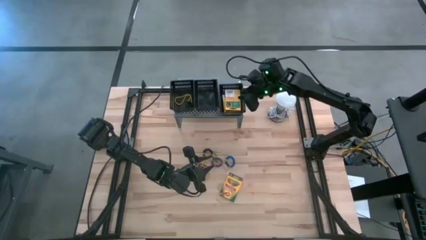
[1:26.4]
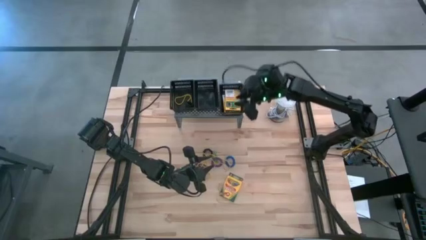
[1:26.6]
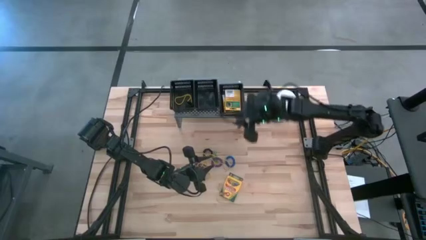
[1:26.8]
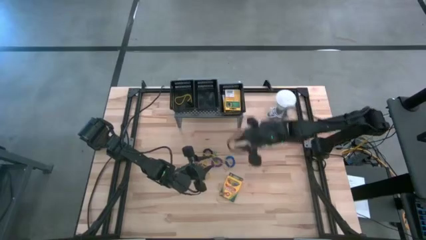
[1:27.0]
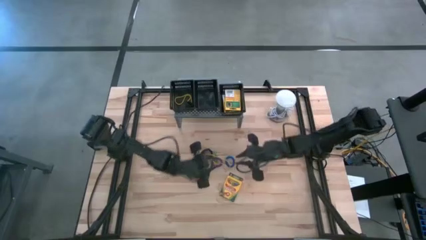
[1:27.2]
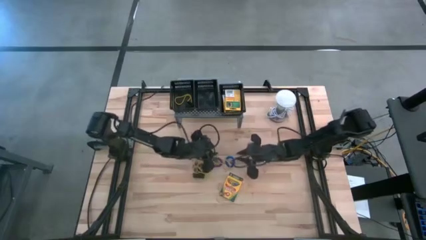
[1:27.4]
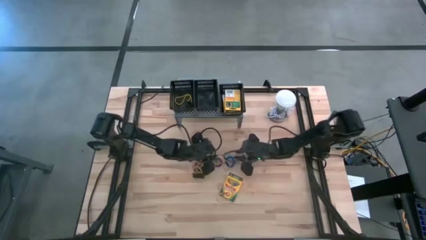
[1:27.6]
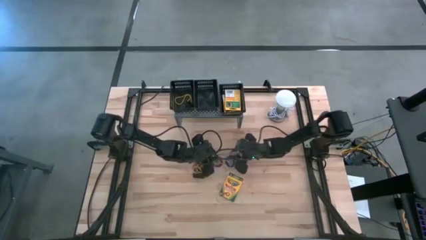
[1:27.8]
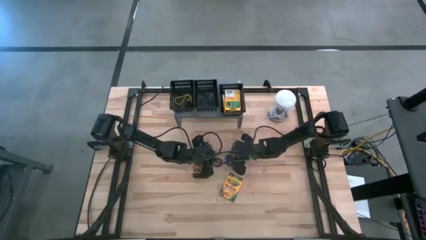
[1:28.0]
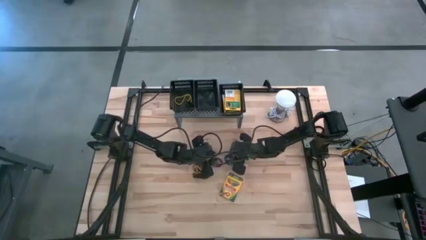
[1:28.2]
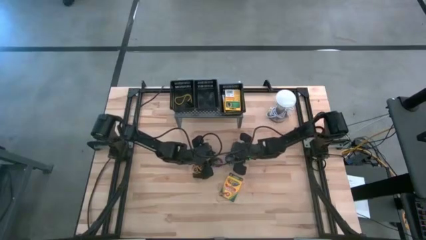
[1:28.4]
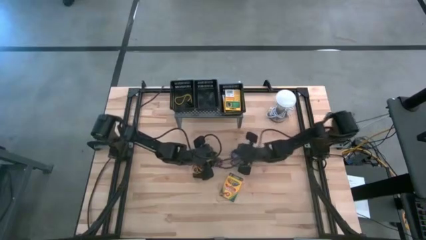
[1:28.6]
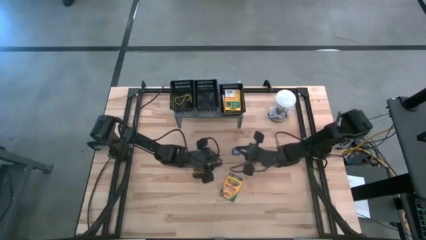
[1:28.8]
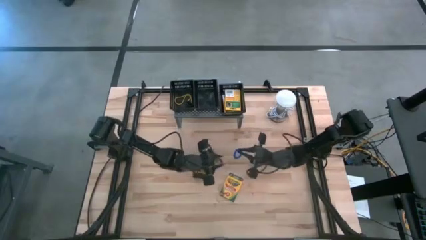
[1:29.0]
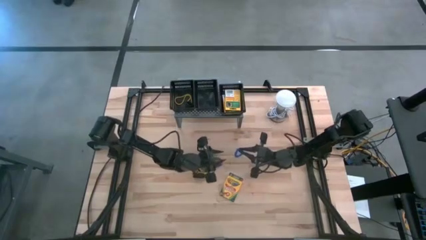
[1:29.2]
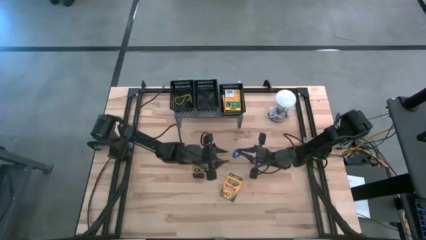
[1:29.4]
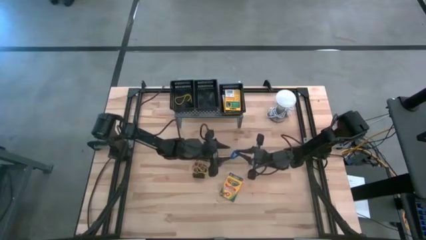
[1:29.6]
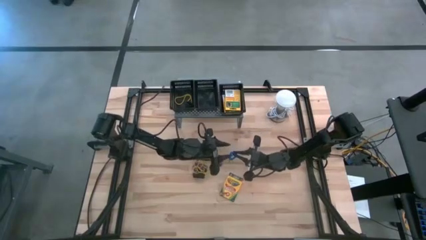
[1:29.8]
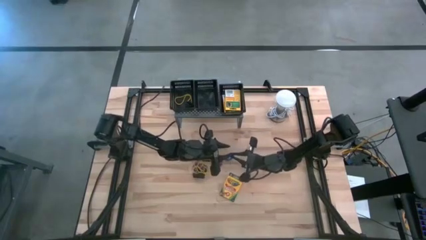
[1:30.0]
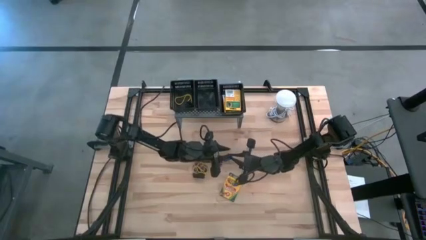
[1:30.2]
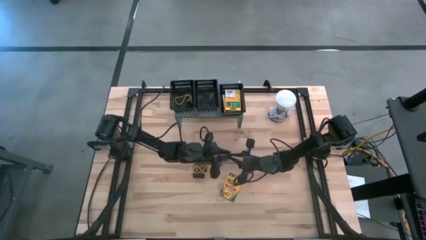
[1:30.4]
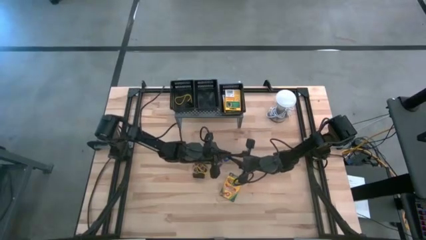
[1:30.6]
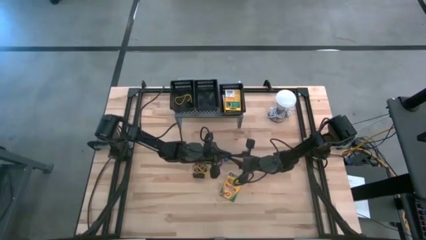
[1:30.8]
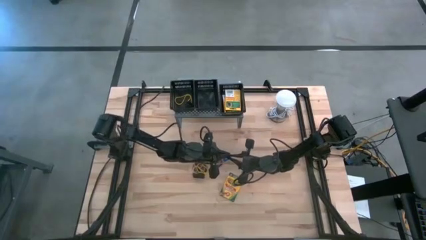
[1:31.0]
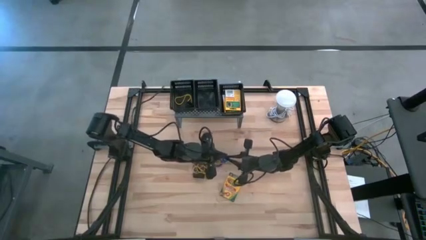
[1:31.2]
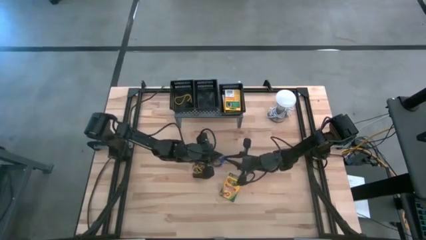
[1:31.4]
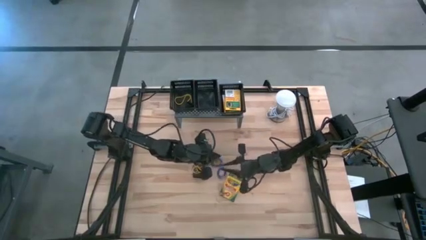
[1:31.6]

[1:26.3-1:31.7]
Task: Pick & Place Office Desk Supplies
Put the blue spring keychain into the middle black bin on the shelf

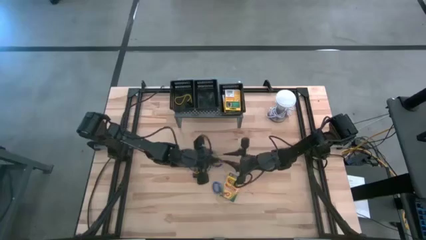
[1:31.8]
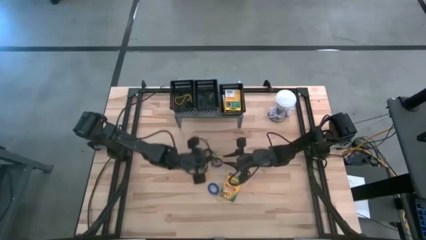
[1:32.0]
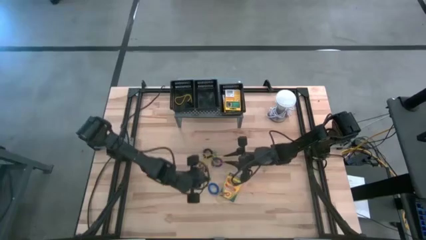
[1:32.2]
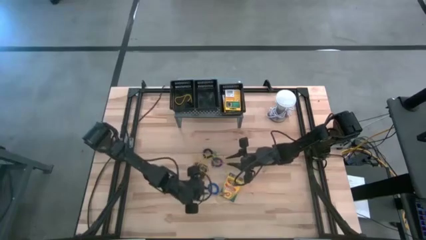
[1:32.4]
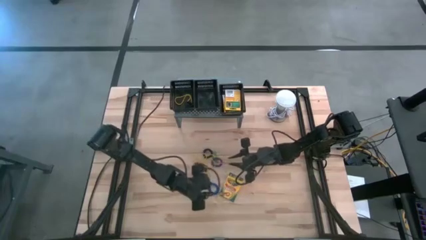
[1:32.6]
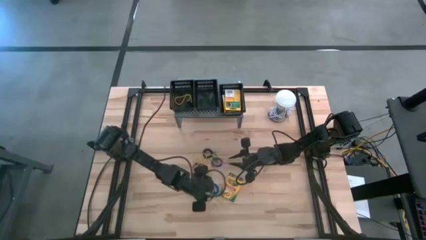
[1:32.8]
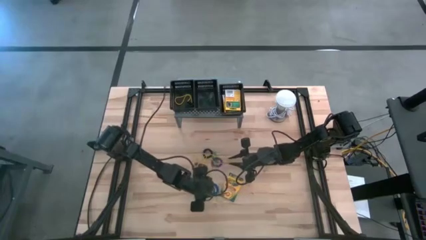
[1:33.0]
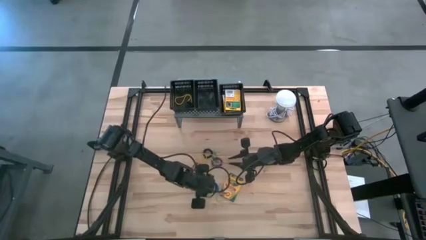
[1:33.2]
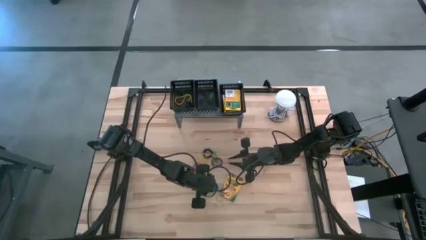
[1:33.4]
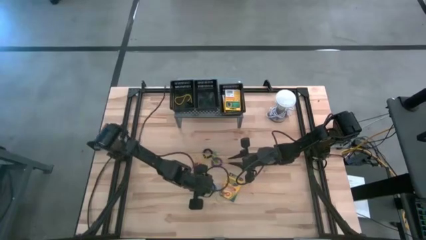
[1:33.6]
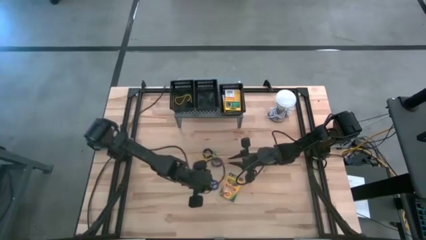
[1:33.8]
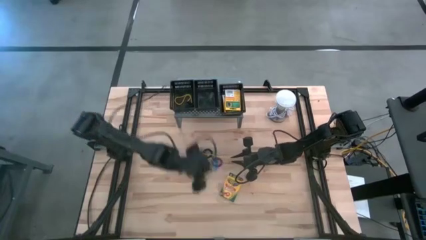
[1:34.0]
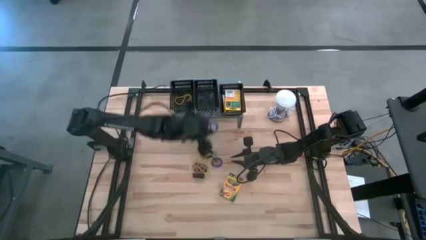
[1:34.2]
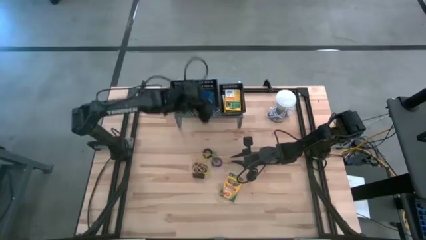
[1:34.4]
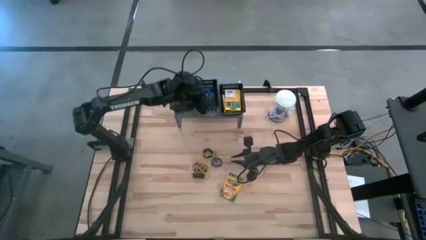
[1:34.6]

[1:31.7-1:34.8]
Put the blue spring keychain into the middle black bin on the shelf

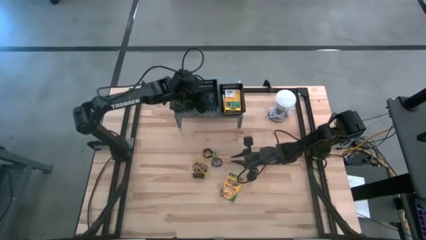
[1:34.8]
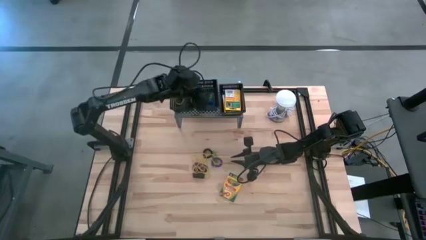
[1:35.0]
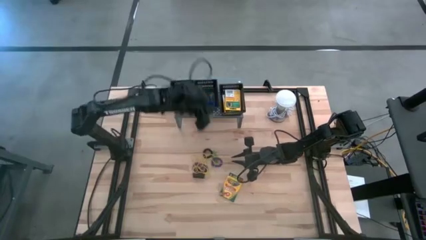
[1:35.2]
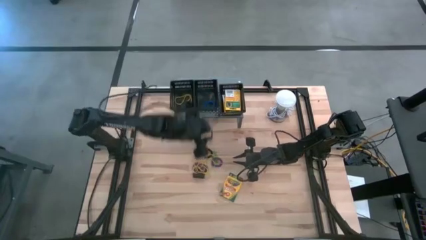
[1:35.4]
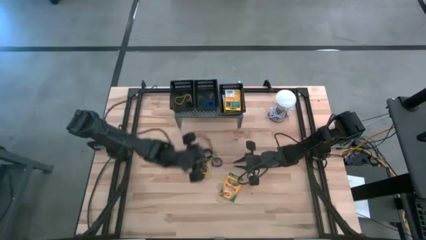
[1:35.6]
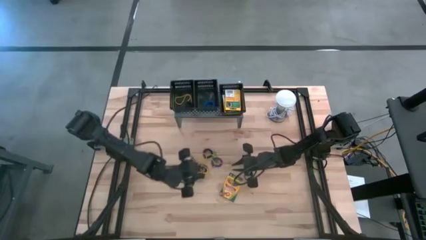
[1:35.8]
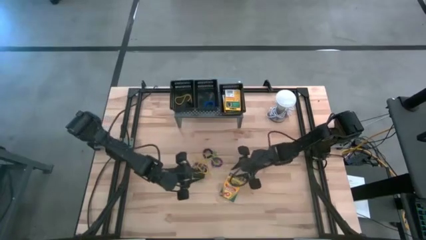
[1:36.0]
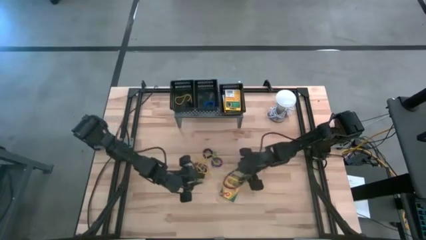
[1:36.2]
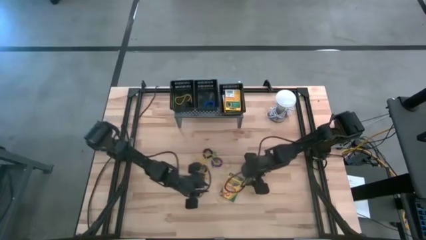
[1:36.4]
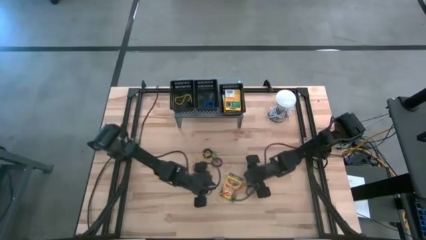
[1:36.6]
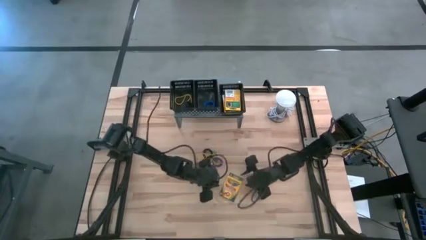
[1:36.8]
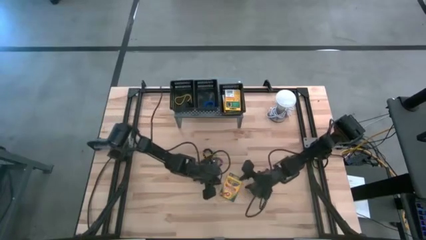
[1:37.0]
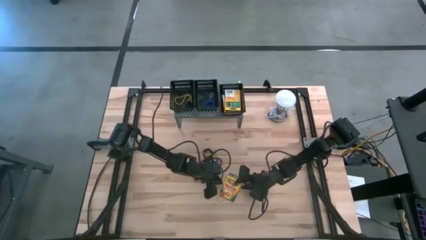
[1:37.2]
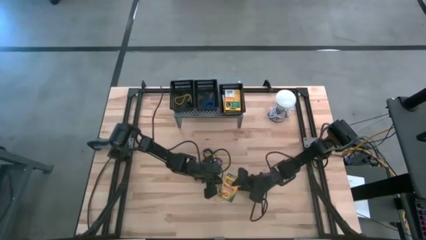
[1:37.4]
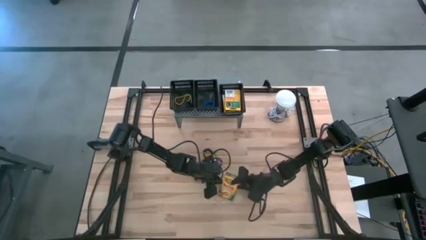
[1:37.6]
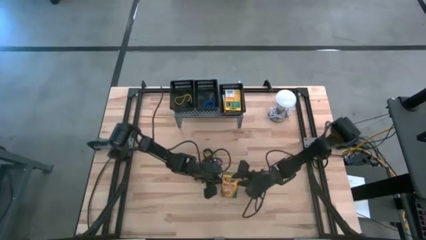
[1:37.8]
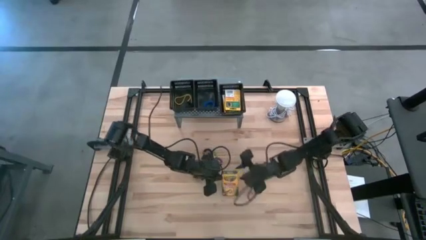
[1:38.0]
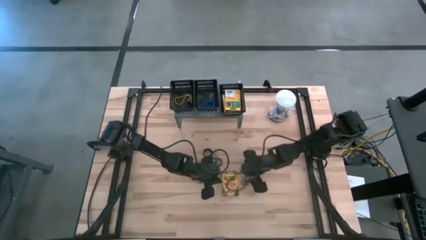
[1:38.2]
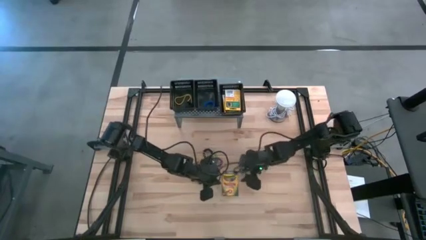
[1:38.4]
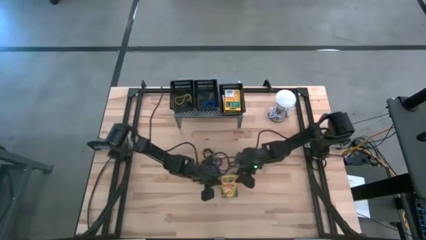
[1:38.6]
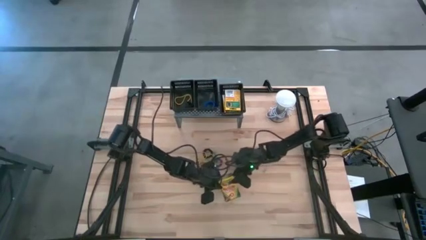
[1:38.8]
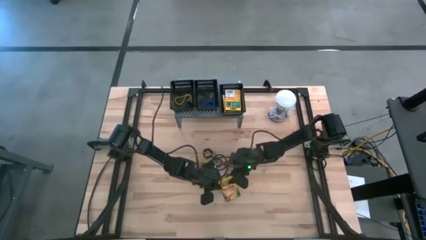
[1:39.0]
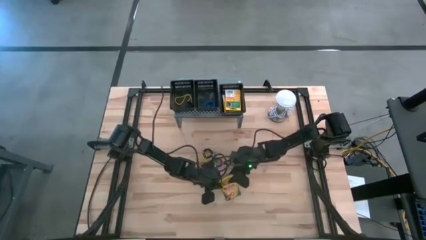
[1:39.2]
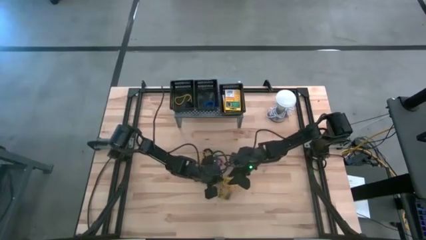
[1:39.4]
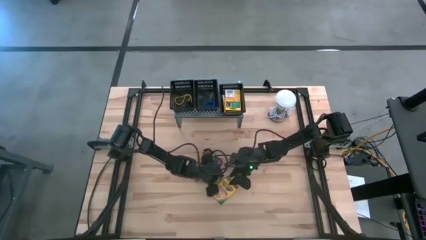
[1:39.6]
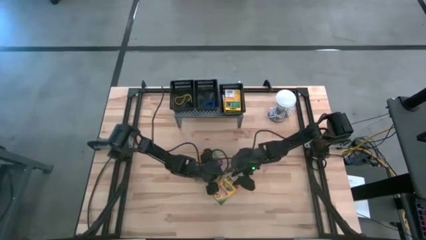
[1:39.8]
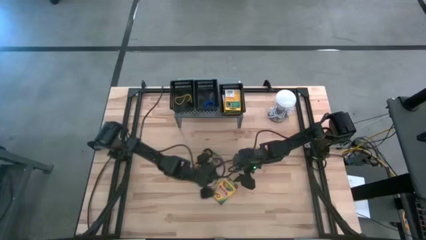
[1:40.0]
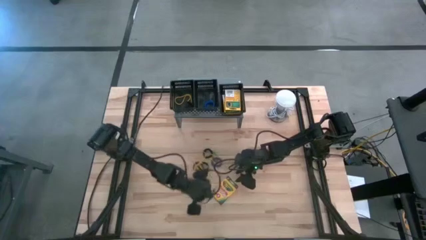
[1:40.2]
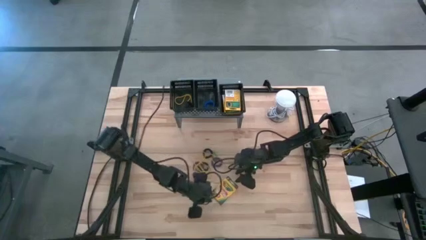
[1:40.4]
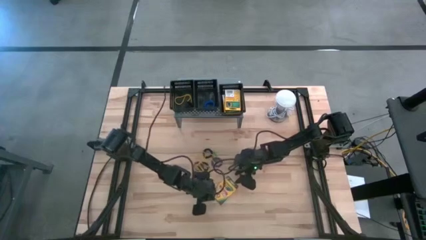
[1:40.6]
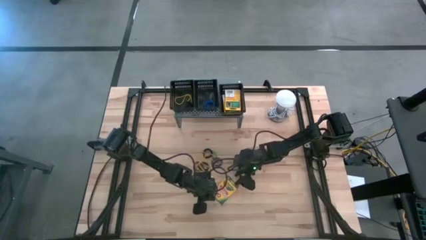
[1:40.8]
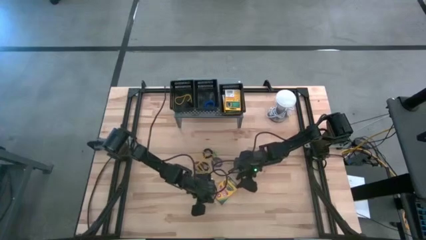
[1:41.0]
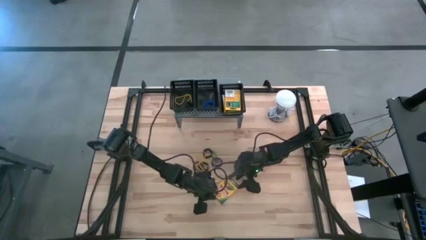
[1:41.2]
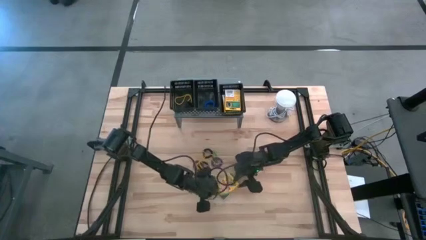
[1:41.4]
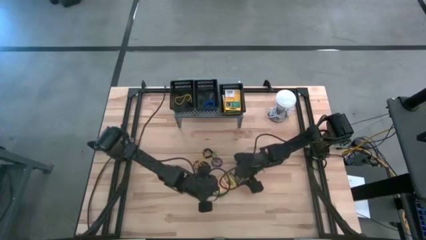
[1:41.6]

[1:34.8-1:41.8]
Put the crayon box into the right black bin on the shelf

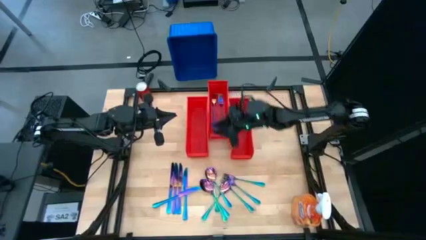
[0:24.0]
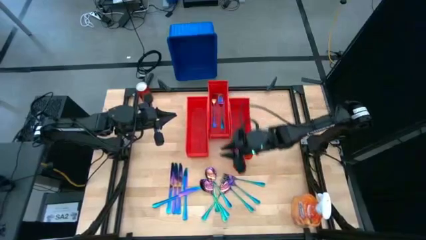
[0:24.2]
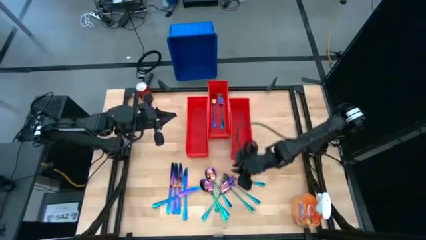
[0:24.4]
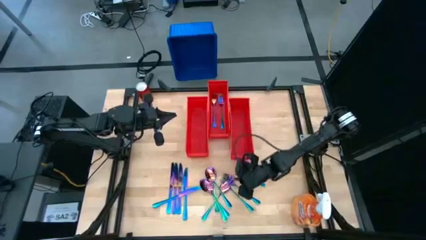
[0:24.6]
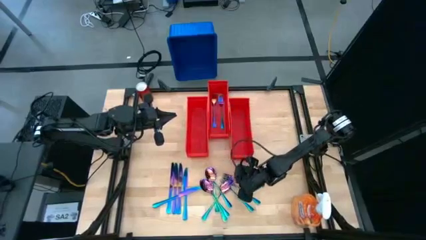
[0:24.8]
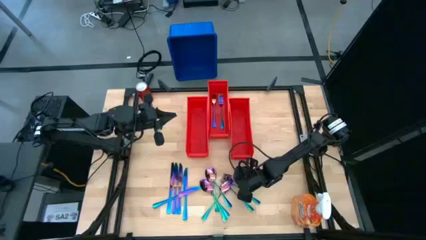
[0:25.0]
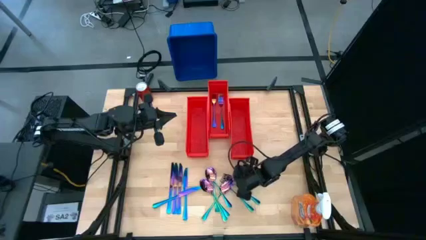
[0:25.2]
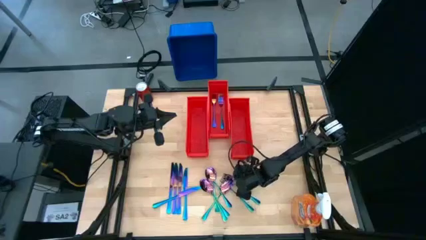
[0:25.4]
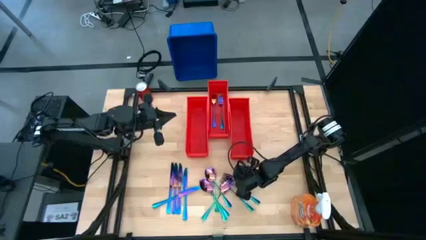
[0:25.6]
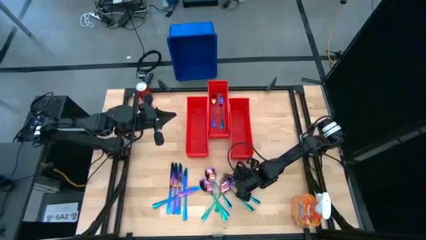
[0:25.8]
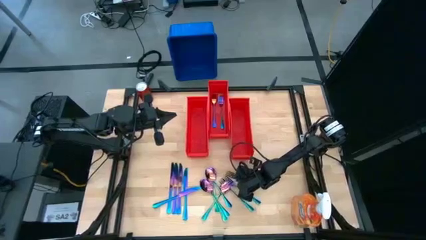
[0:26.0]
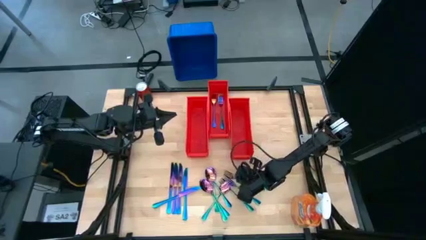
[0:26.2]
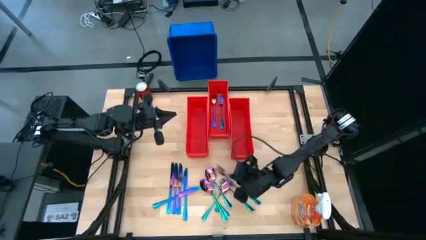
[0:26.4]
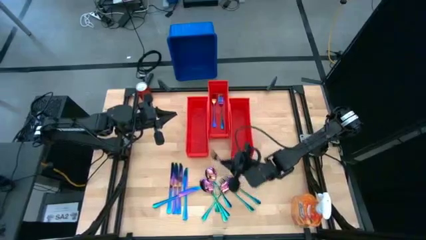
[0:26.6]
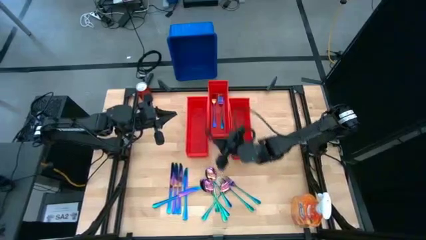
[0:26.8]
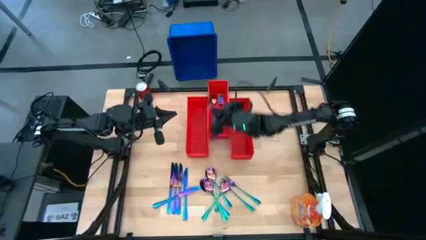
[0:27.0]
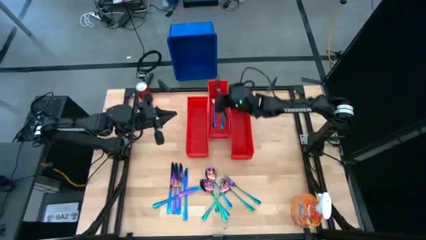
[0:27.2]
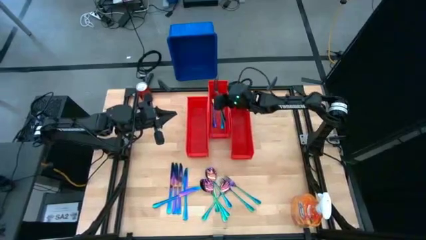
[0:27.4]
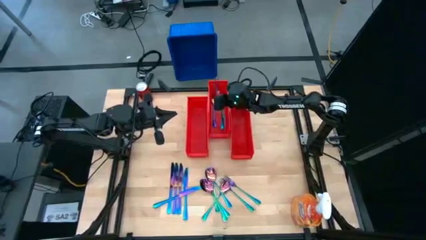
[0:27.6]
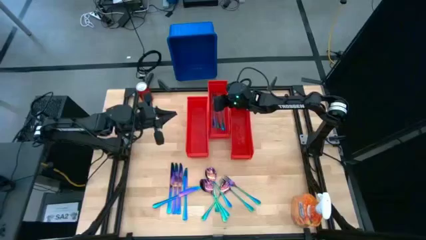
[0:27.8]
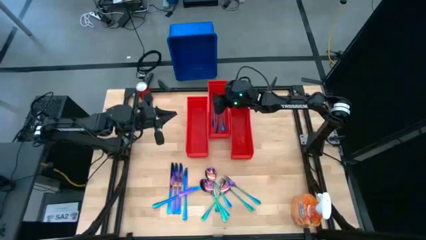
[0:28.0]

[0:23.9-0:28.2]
Task: Sort silverware
Put the iridescent fork into the middle orange bin
